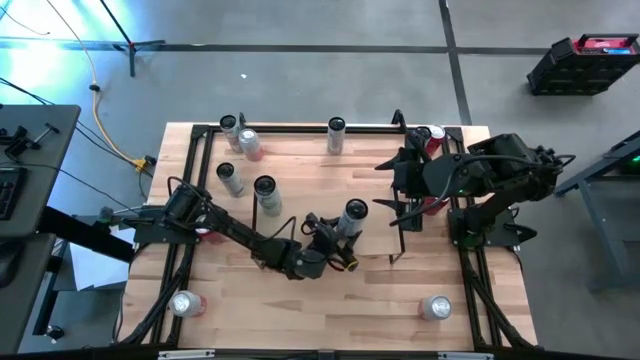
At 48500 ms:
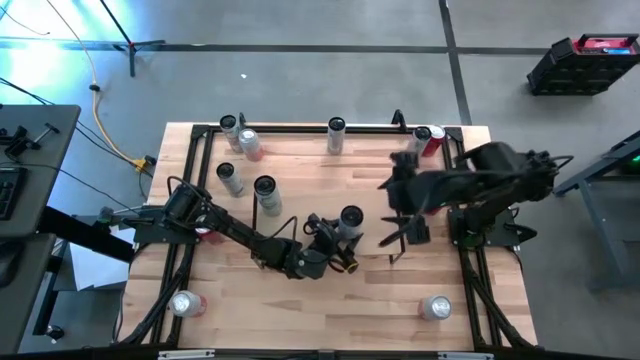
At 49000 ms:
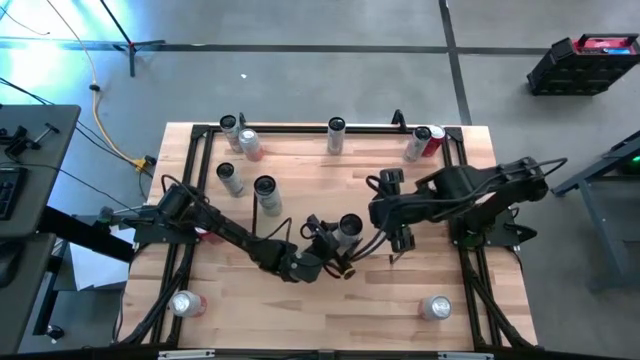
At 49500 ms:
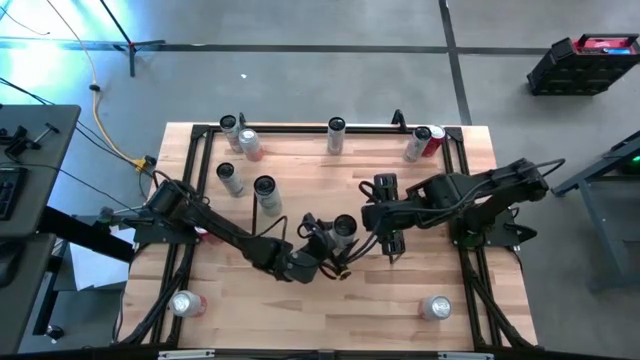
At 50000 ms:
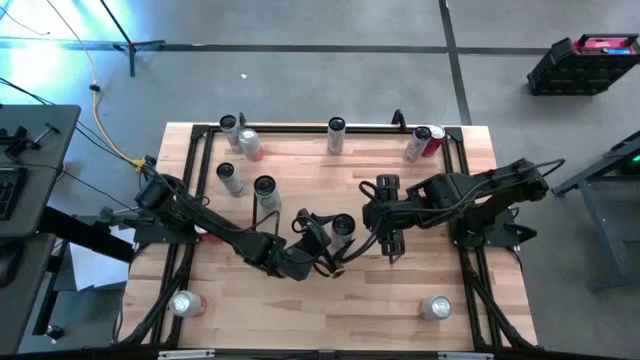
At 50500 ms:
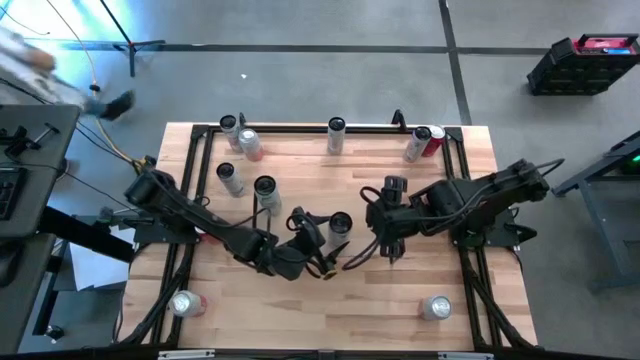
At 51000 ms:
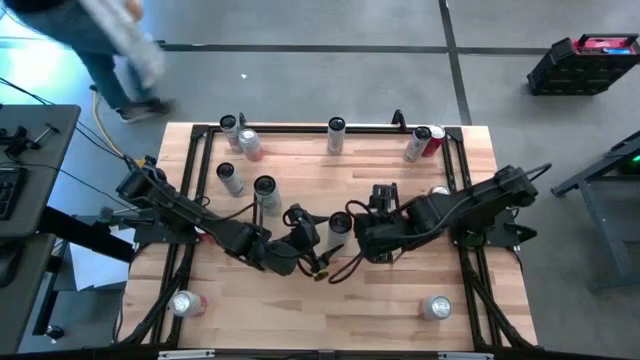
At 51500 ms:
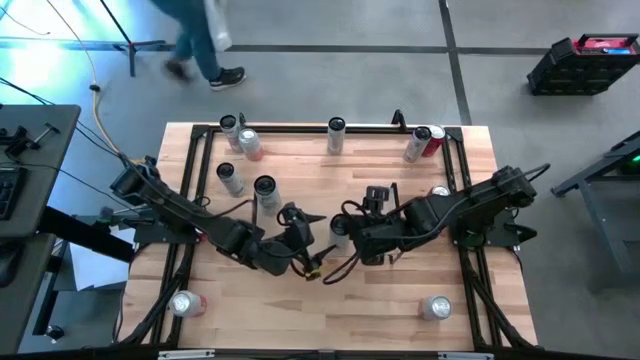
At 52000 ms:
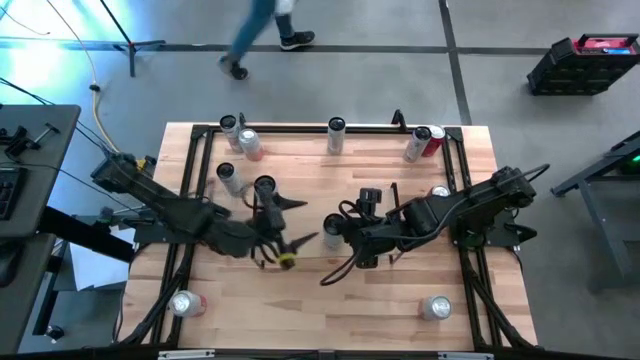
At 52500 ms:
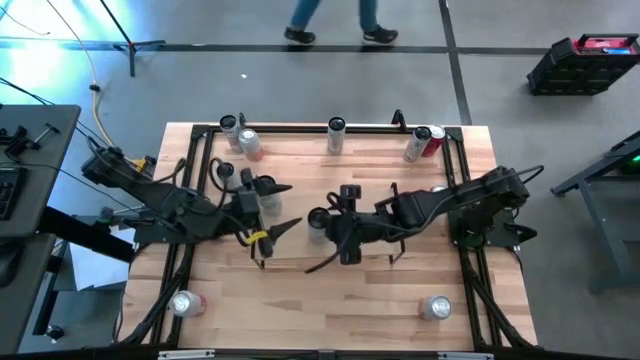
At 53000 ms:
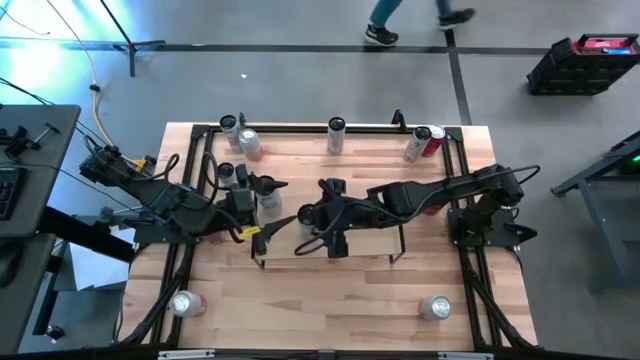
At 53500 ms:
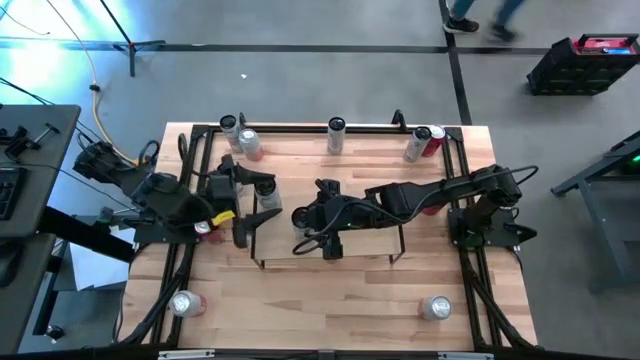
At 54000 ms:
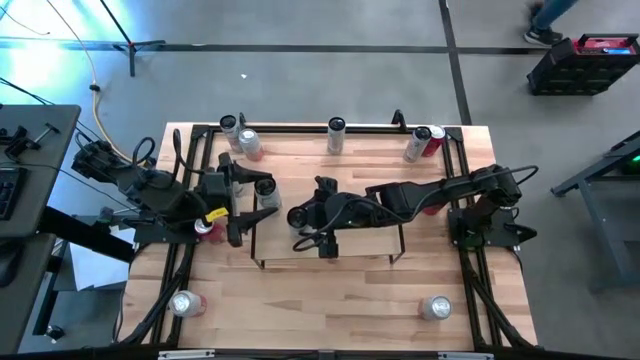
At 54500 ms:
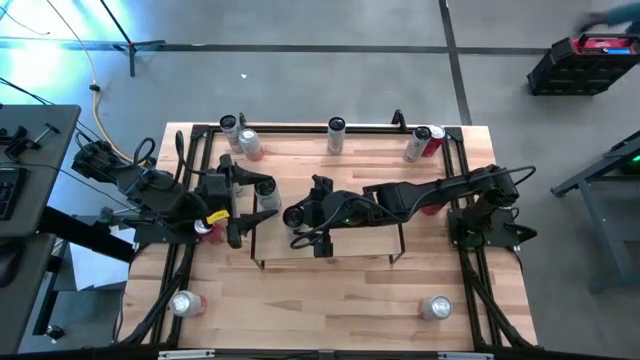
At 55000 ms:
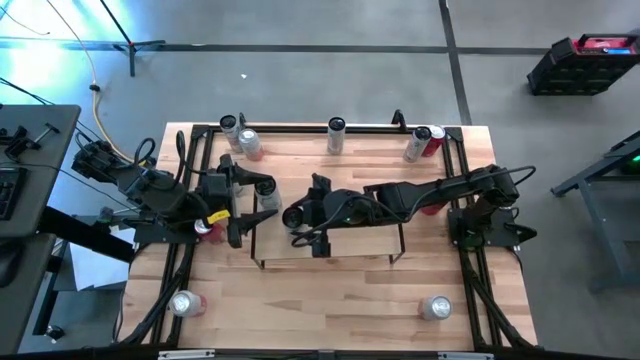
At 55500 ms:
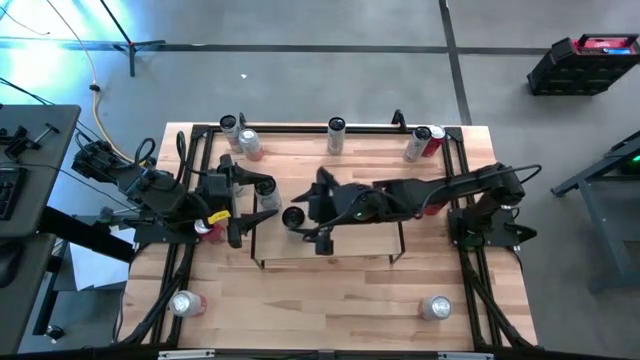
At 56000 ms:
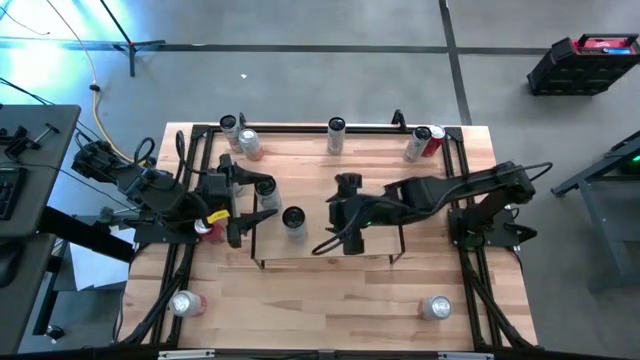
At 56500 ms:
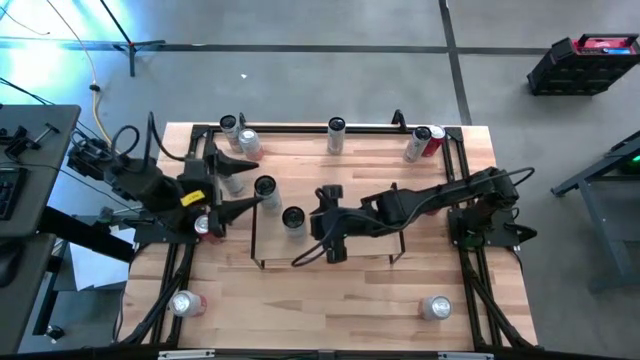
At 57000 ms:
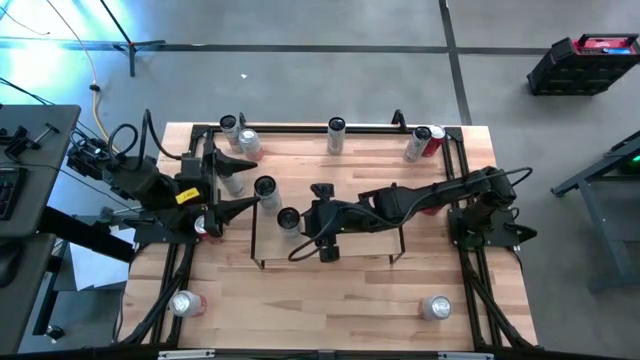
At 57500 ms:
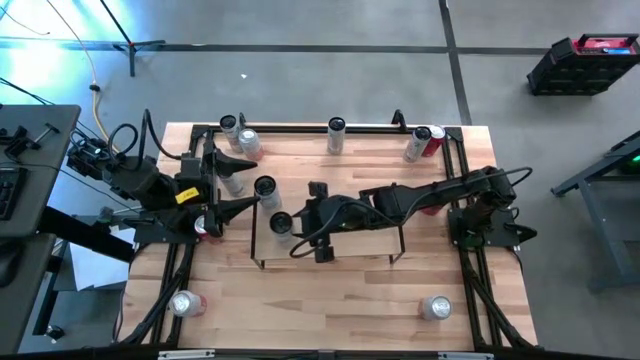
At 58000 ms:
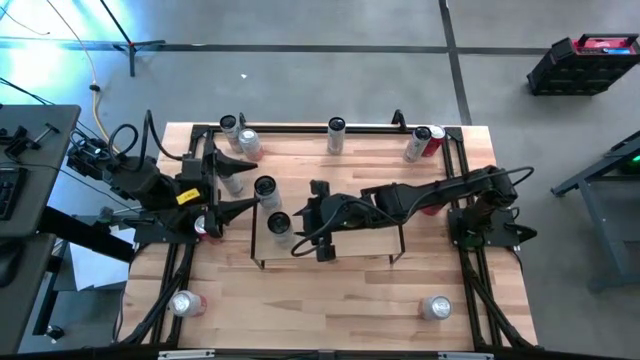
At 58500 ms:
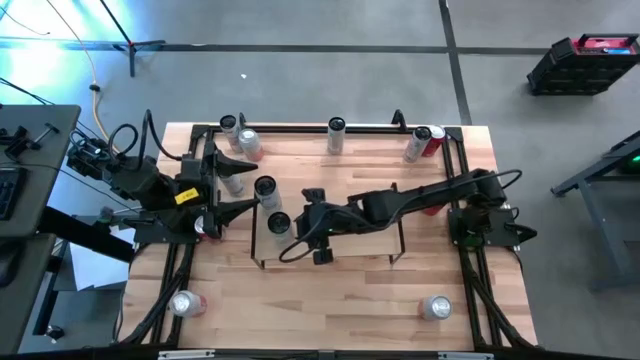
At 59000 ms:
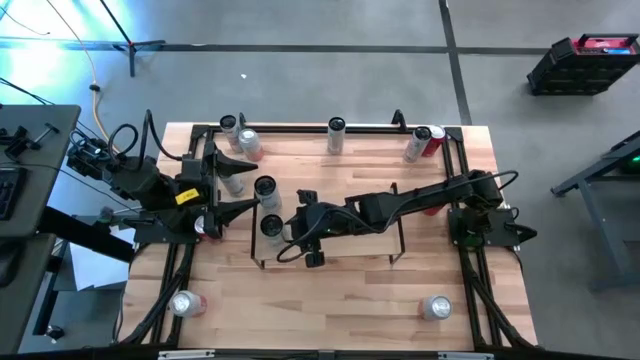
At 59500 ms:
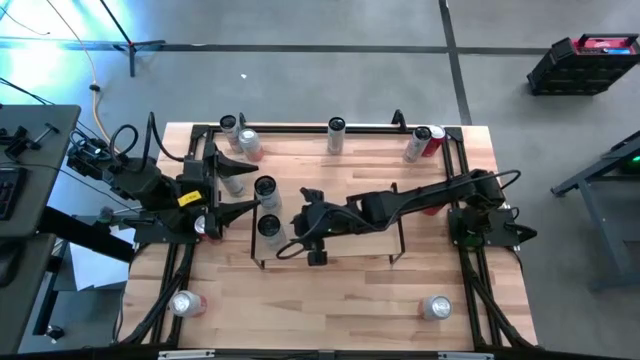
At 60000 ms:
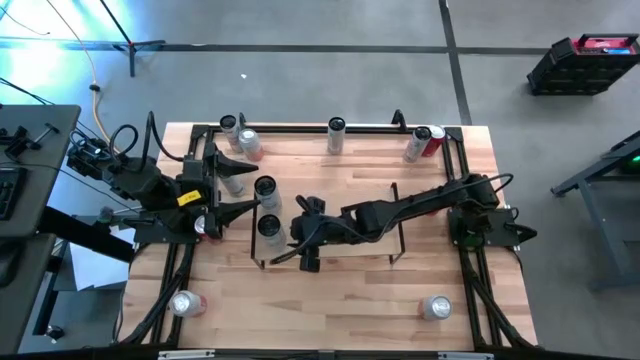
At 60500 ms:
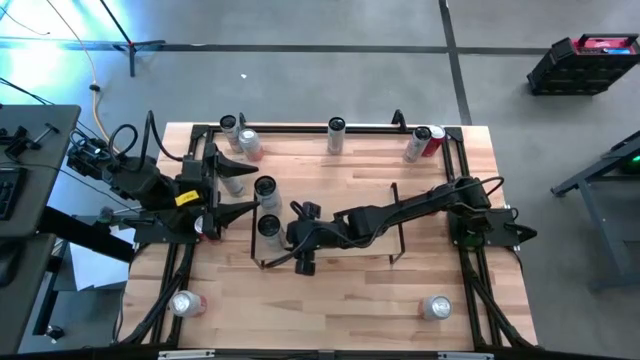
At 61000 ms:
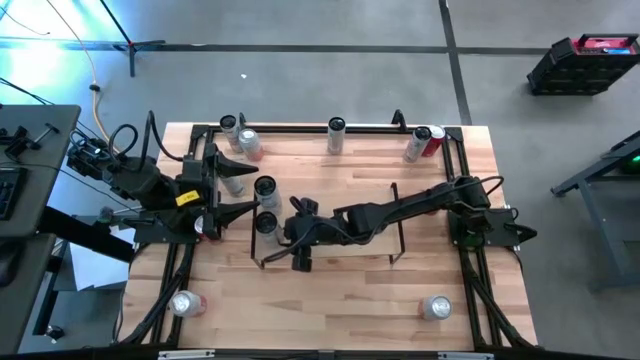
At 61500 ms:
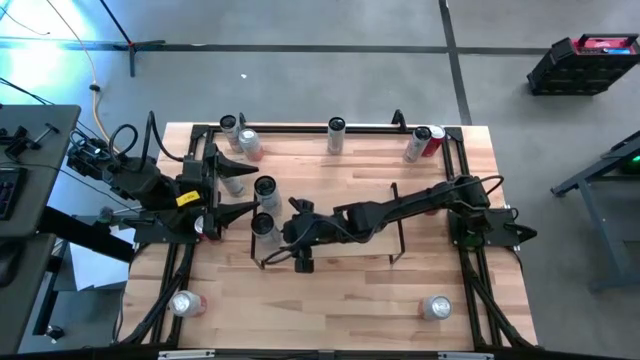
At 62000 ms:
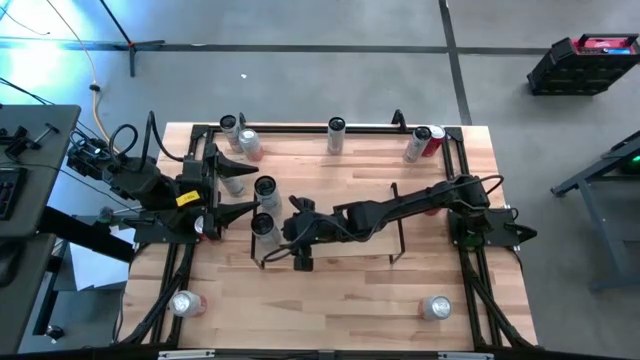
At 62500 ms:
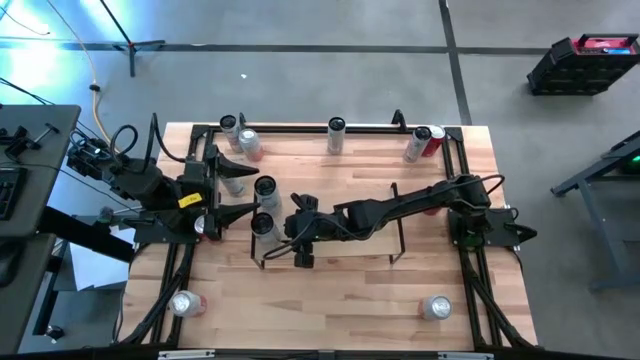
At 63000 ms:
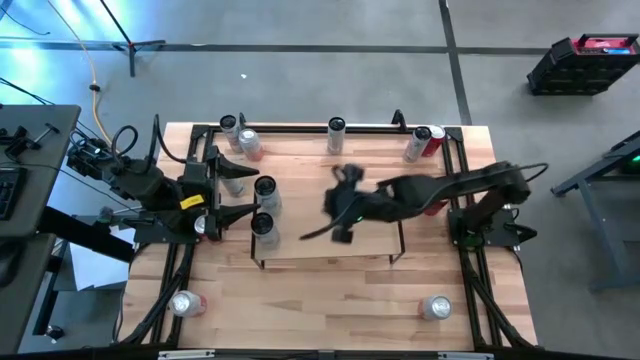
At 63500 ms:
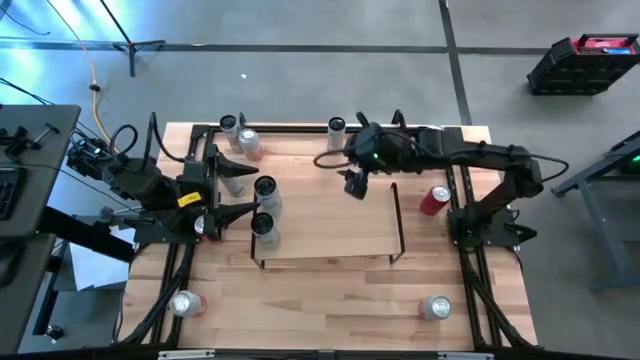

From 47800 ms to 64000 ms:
Task: Place canned beverage on shelf
Put the bottom white blue soda can aligned with the other white blue soda can on the shelf

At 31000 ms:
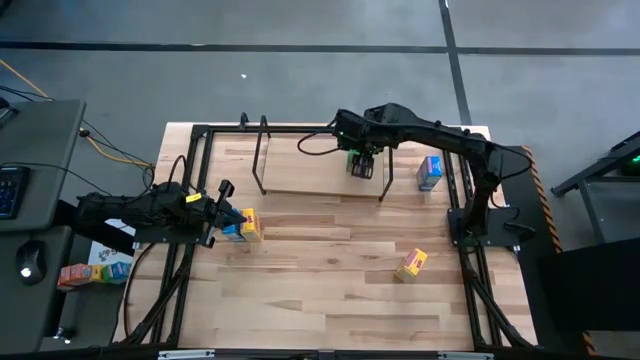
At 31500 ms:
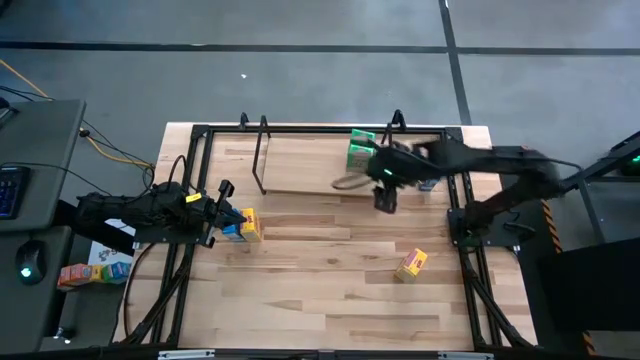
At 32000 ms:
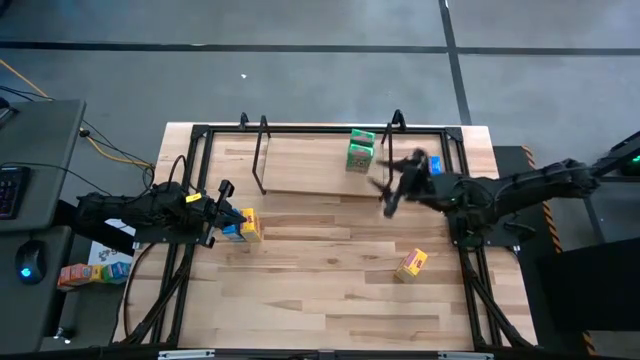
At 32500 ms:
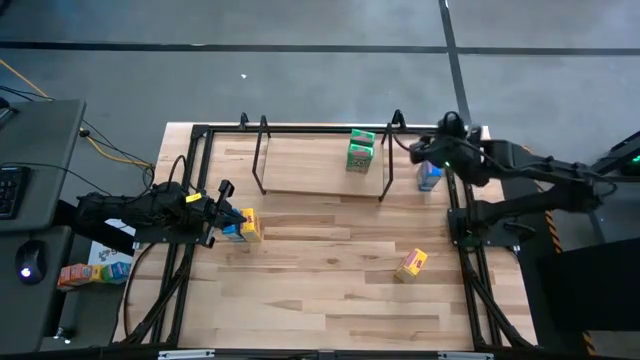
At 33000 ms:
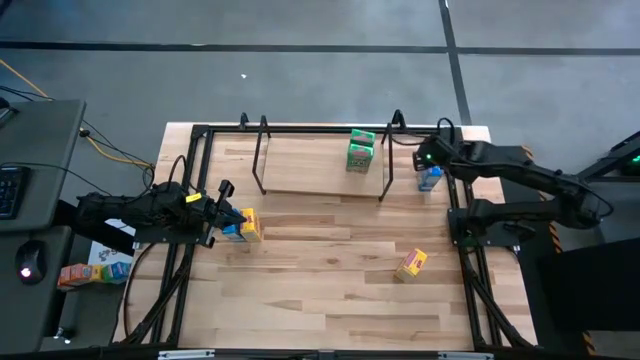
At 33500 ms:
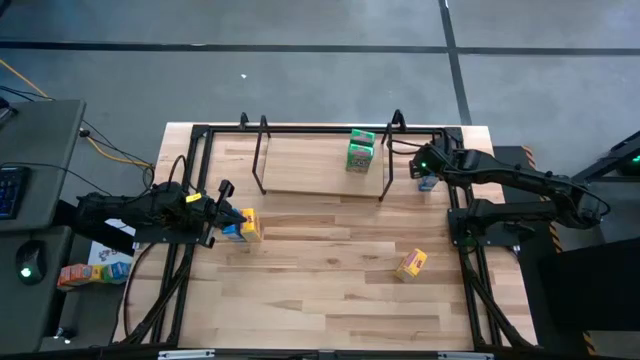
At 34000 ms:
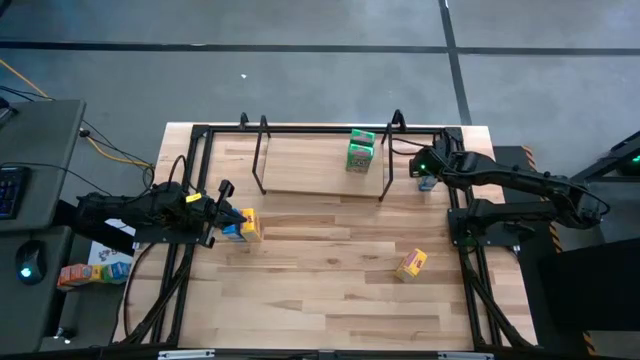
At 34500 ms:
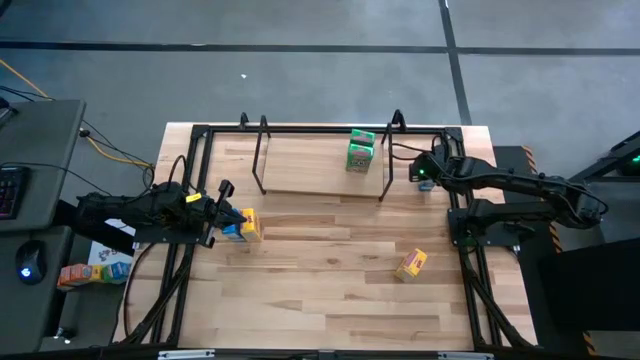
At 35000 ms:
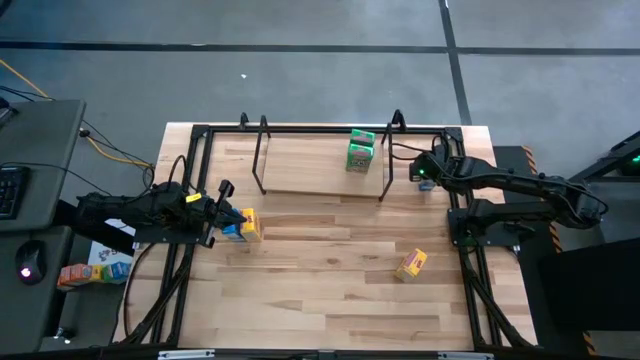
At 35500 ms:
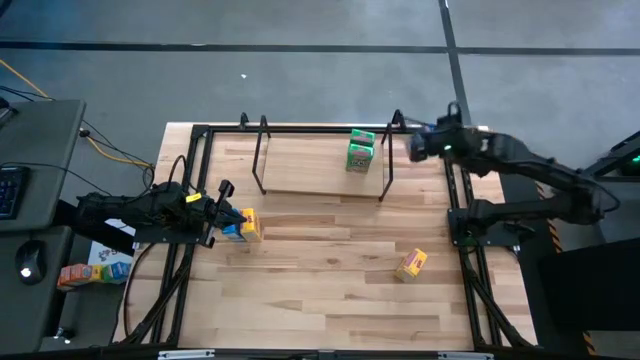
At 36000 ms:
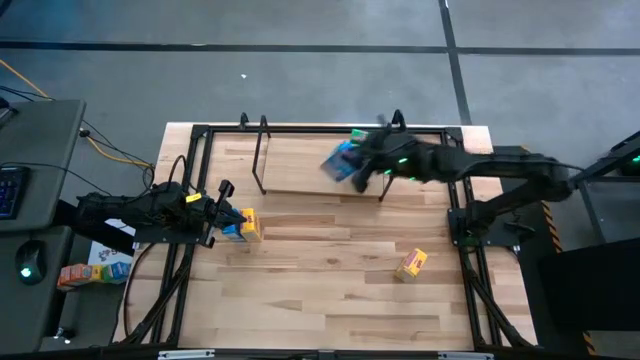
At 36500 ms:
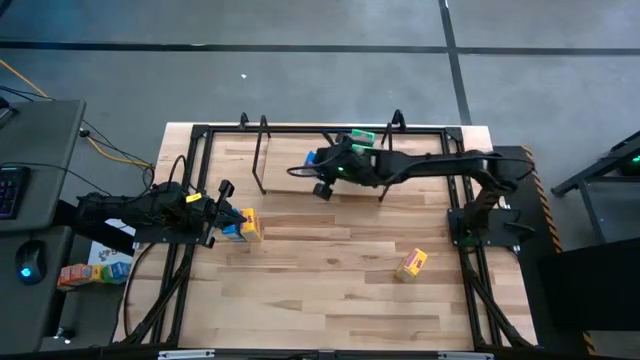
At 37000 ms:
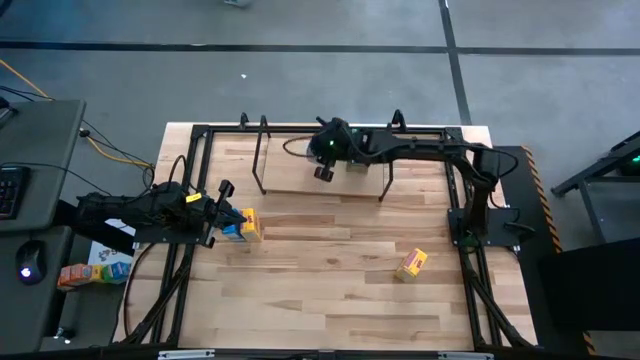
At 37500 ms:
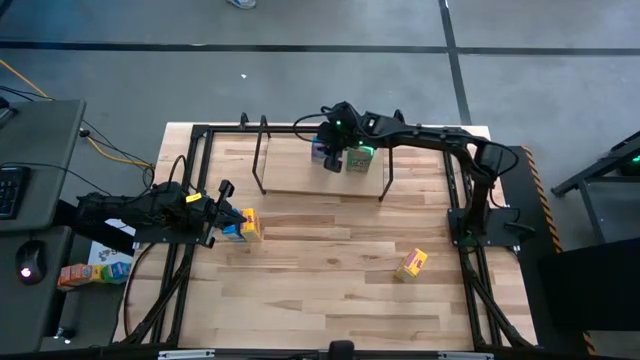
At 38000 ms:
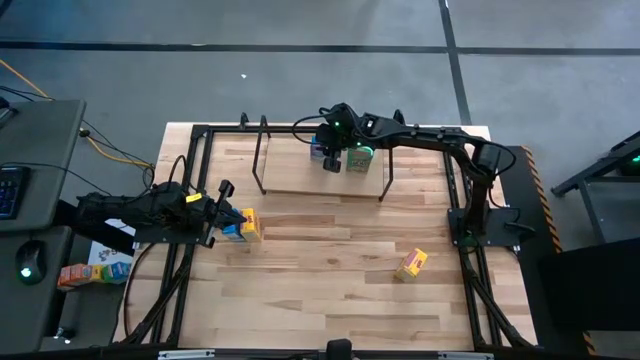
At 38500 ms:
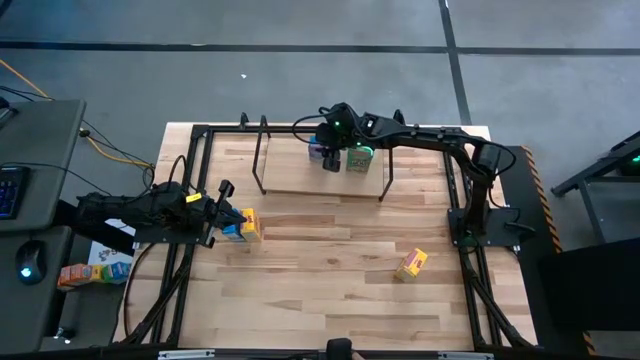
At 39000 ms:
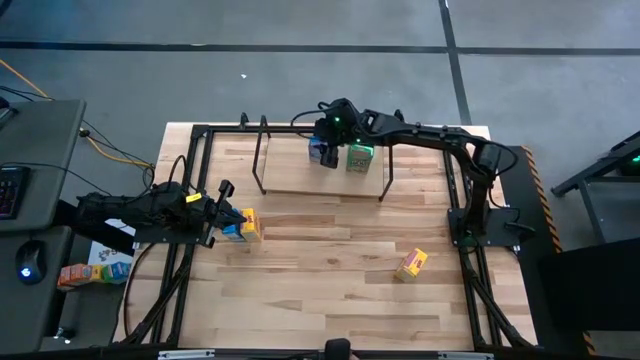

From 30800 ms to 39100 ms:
Task: Stack cereal on shelf
Put the right blue cereal box on the shelf
